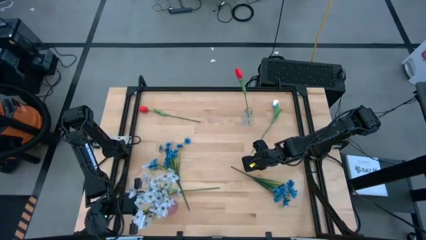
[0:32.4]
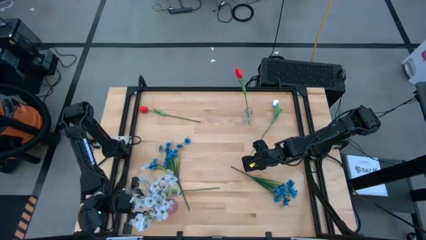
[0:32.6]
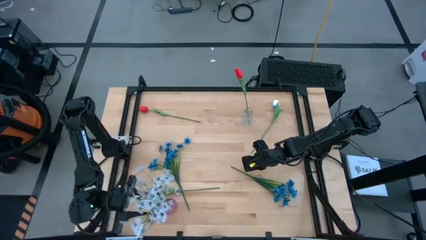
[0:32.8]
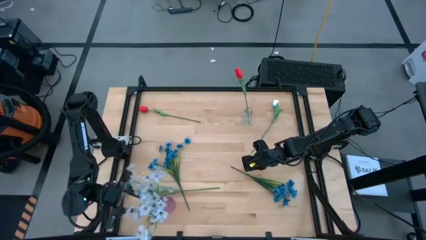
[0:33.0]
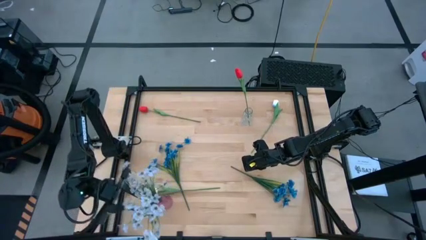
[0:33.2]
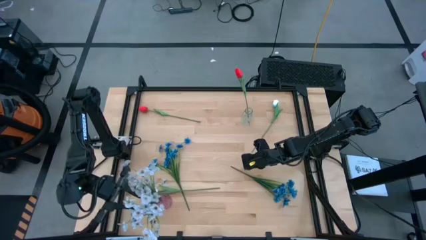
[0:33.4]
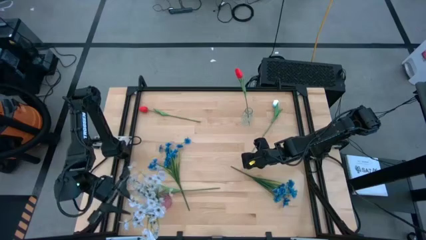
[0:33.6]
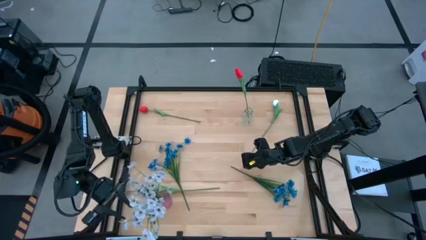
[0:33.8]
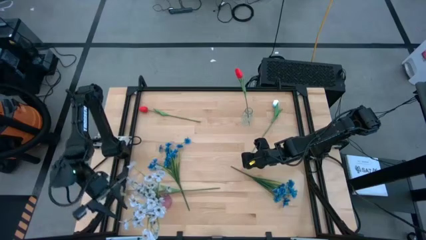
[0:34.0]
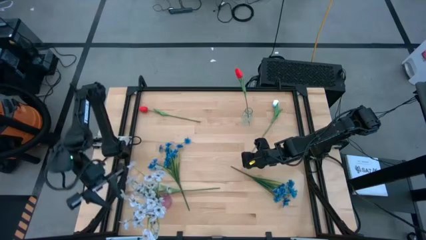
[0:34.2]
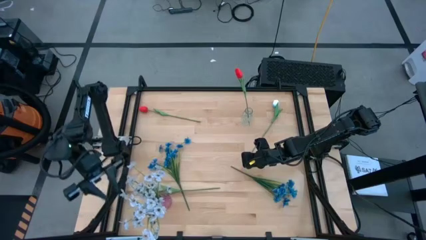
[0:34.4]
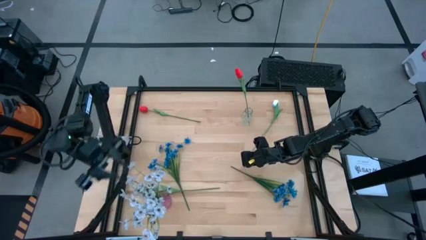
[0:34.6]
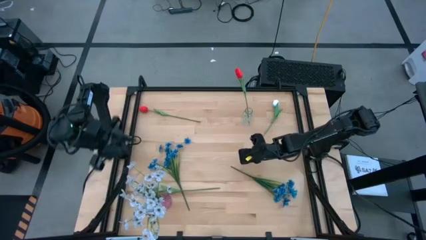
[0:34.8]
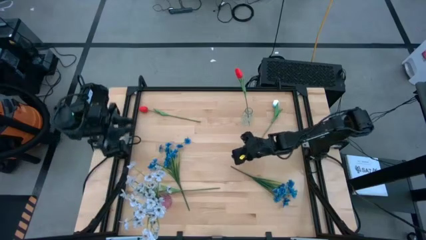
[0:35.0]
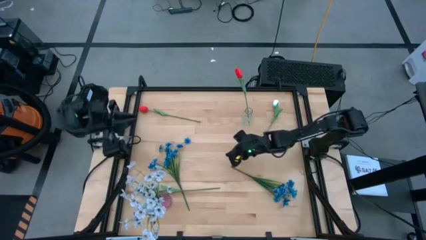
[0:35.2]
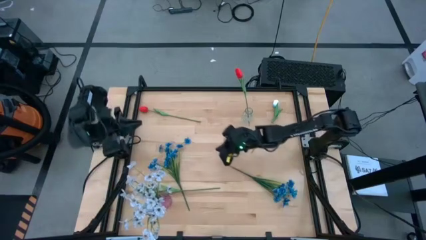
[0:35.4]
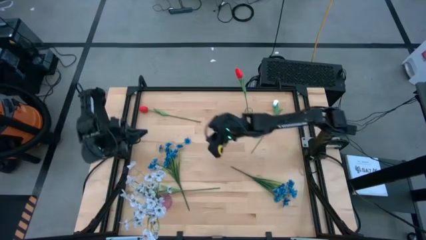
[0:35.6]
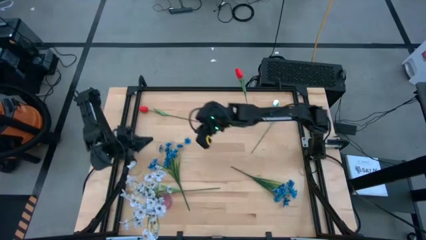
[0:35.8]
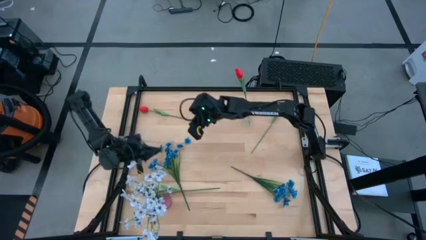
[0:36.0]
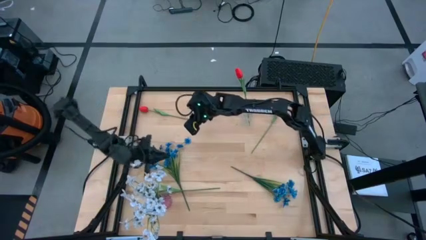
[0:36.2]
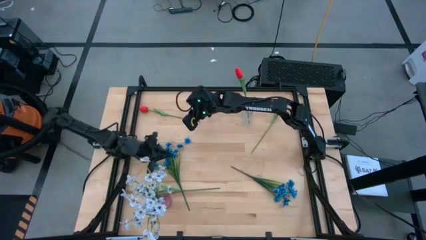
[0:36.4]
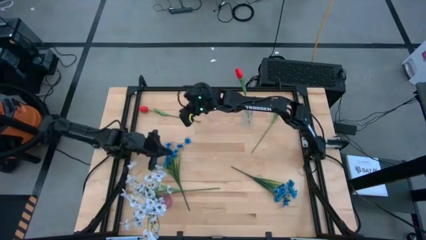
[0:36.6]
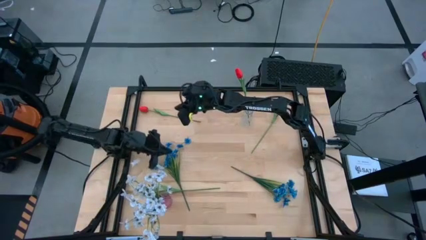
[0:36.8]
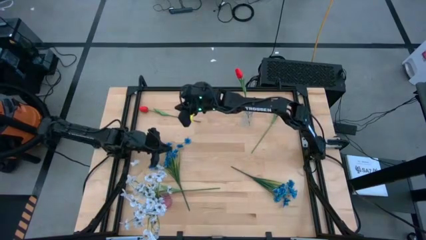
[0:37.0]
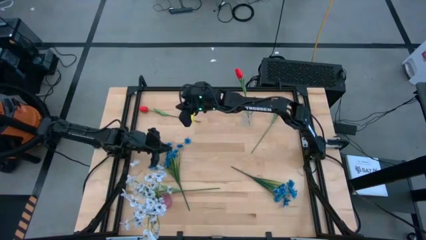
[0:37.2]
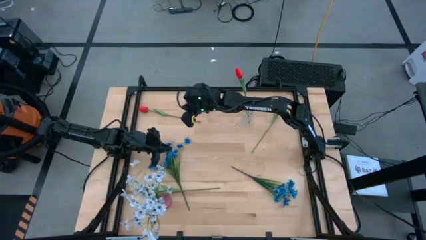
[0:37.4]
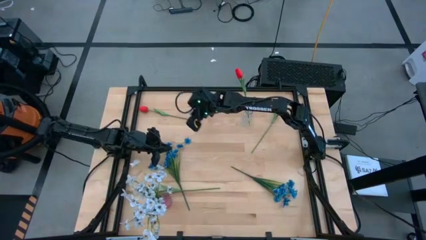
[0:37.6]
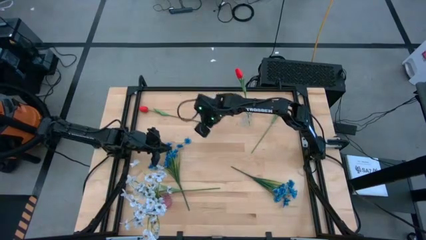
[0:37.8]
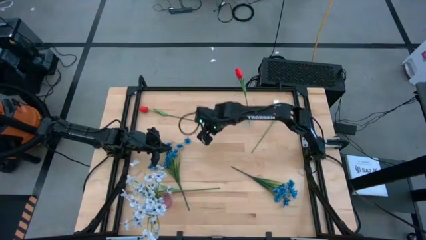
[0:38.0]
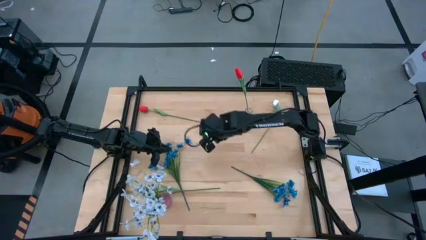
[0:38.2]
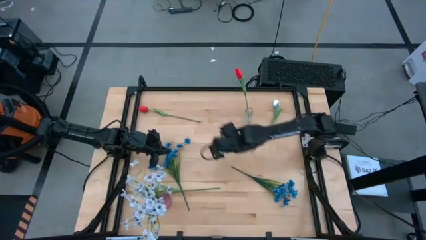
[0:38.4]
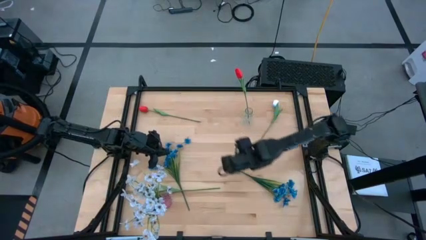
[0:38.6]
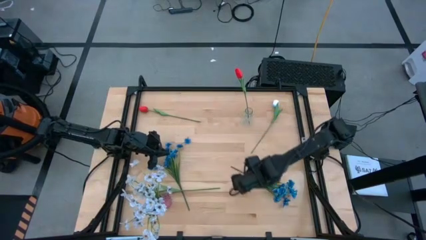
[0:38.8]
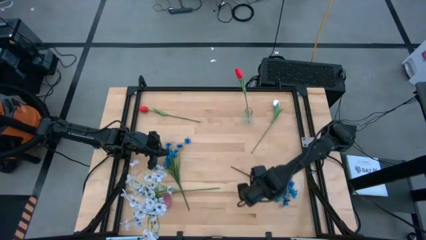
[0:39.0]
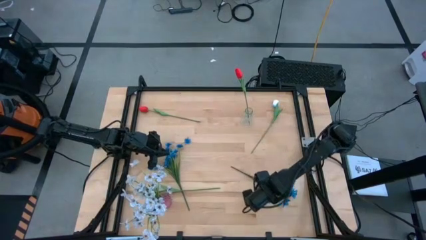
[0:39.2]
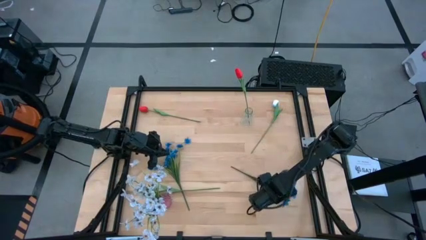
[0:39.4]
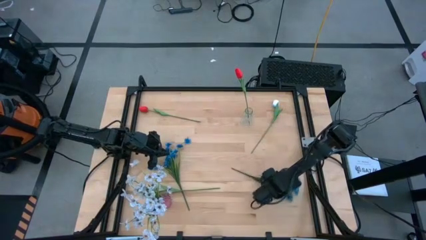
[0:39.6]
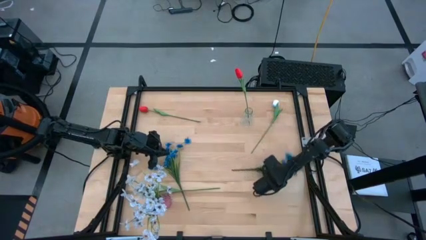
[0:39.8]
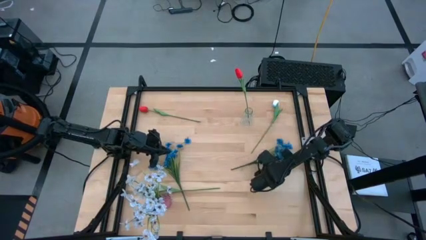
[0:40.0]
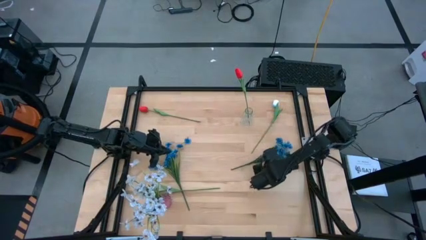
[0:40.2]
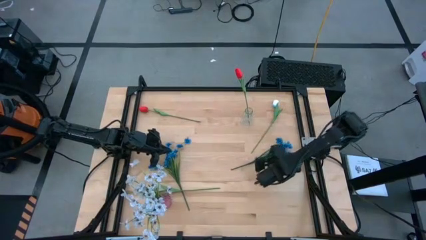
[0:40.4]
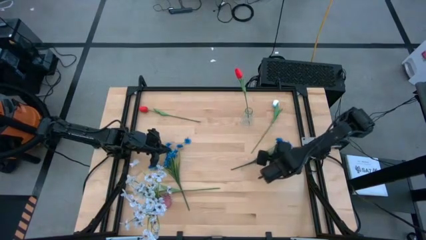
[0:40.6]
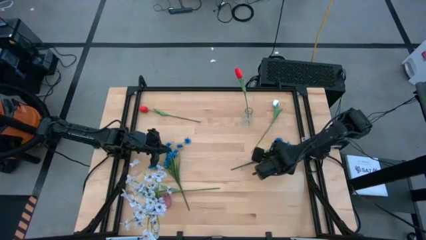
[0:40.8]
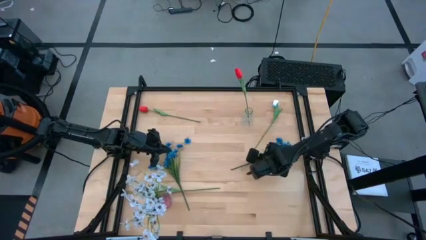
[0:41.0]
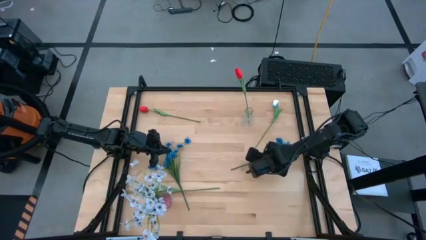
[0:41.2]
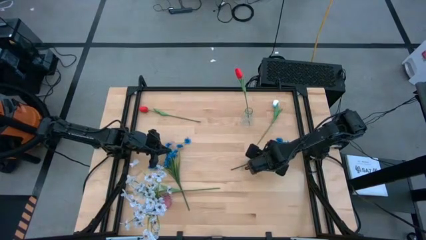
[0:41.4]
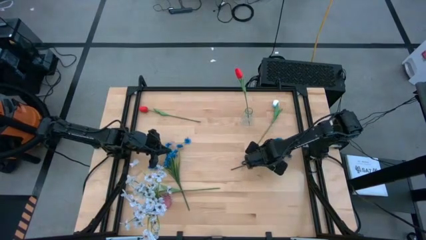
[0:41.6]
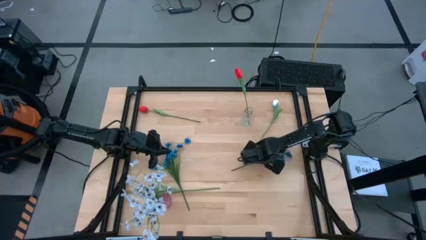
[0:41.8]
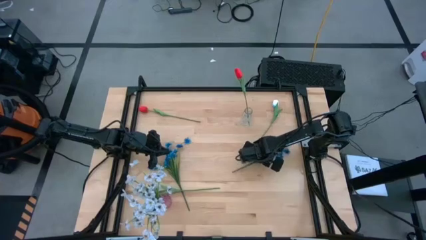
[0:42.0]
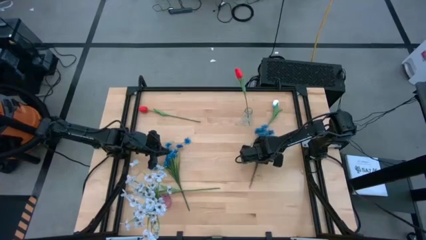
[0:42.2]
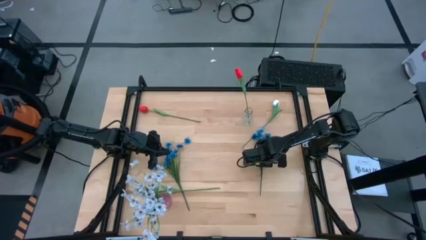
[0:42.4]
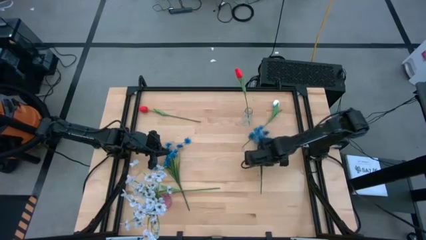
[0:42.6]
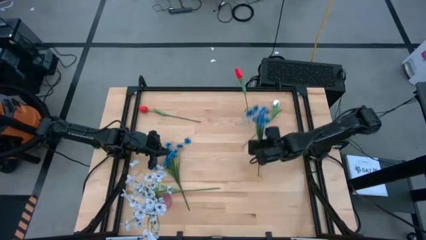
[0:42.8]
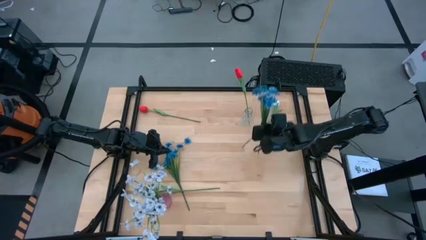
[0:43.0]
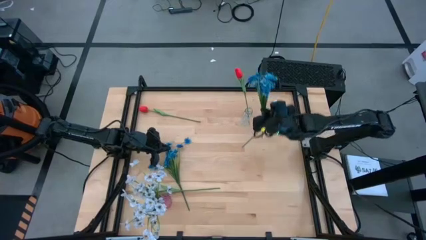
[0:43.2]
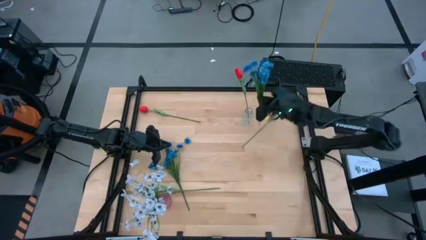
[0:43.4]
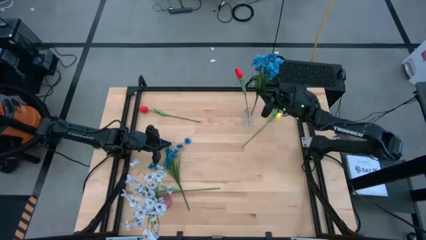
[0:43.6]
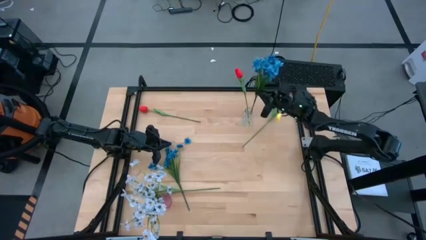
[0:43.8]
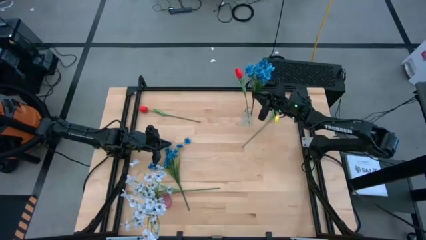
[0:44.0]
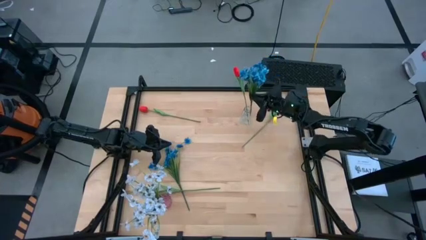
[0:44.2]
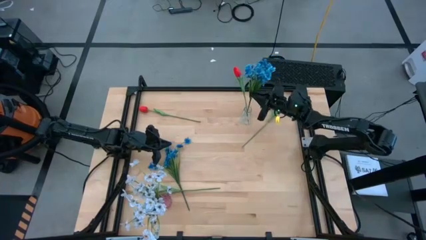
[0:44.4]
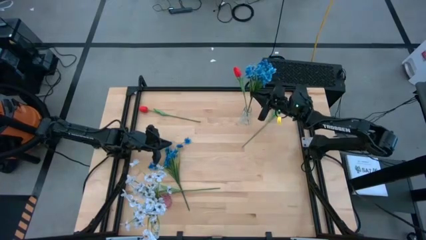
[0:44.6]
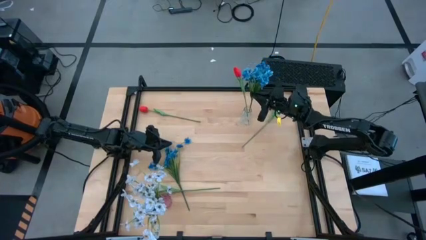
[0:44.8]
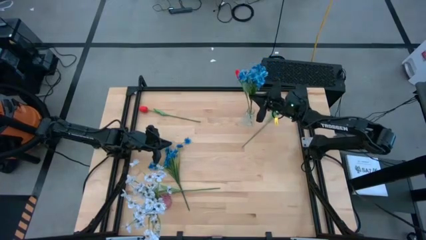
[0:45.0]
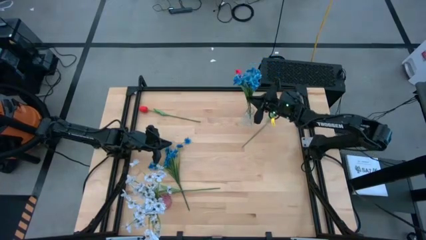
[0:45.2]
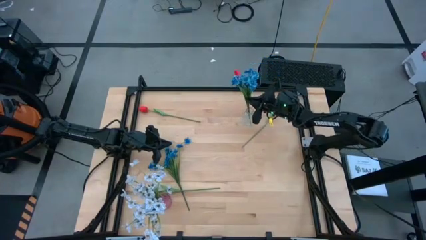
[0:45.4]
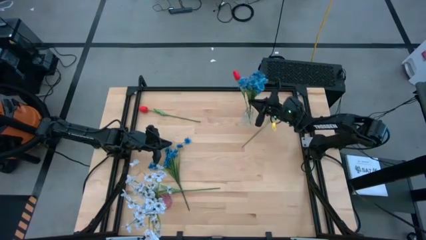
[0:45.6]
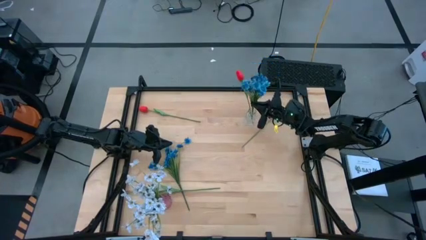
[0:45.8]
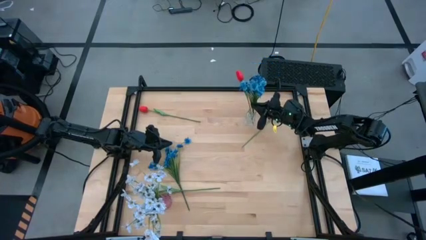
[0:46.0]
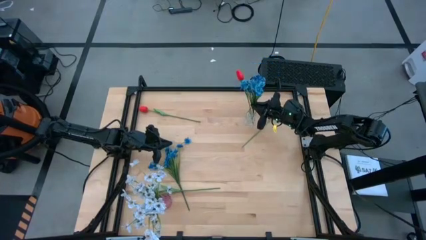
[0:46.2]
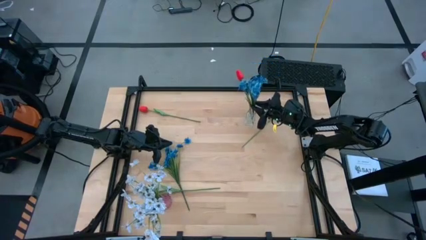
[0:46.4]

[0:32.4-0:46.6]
Task: Sort flowers into vase by color
Put the right blue flowers into the transparent vase

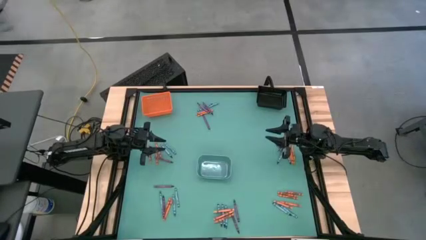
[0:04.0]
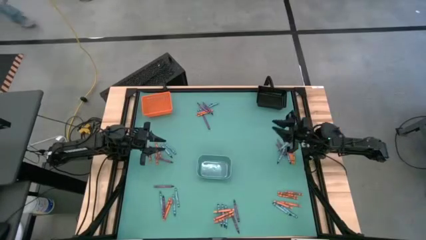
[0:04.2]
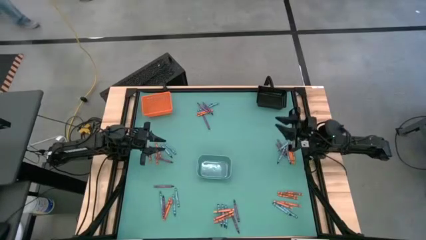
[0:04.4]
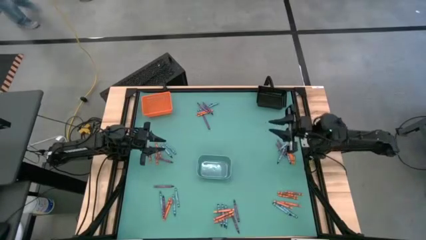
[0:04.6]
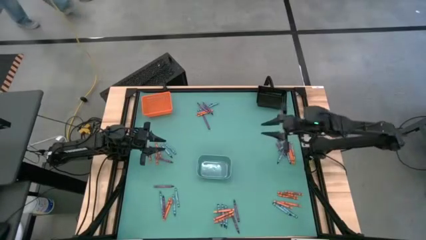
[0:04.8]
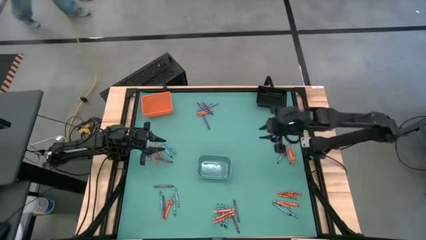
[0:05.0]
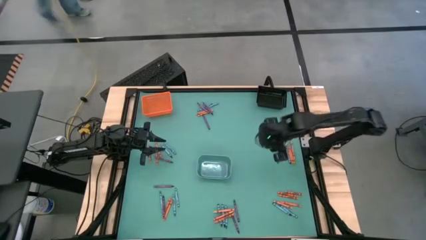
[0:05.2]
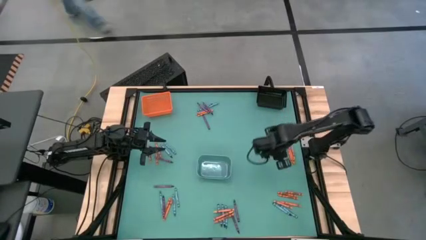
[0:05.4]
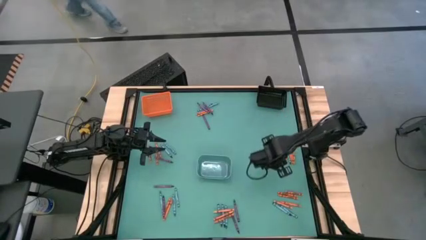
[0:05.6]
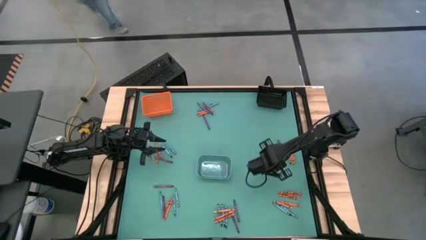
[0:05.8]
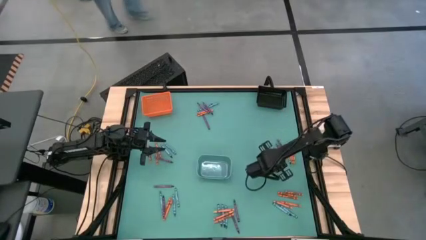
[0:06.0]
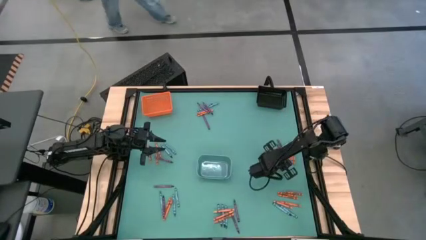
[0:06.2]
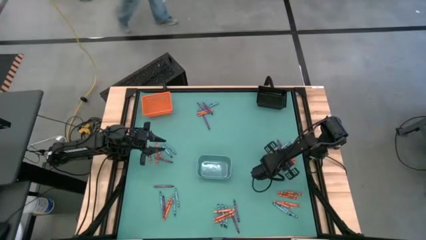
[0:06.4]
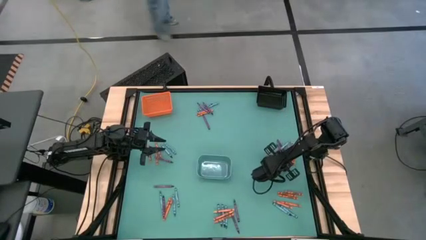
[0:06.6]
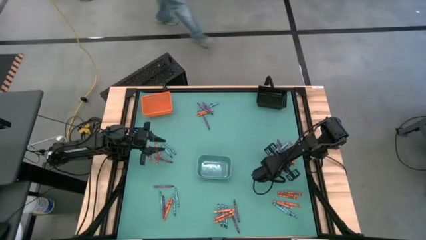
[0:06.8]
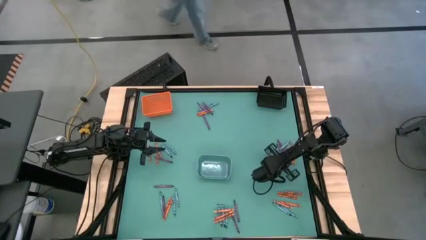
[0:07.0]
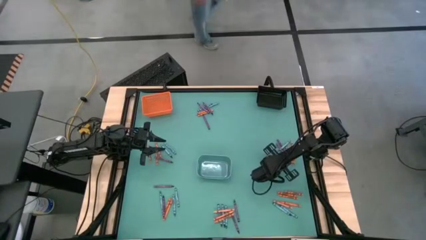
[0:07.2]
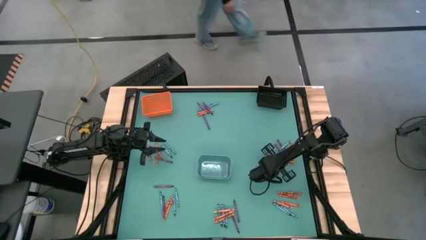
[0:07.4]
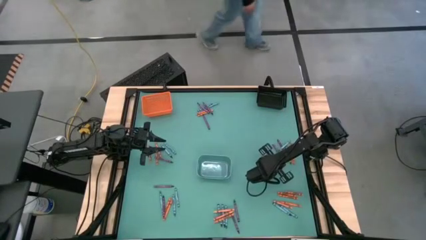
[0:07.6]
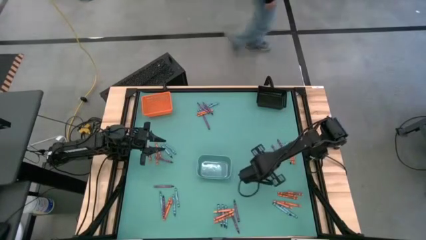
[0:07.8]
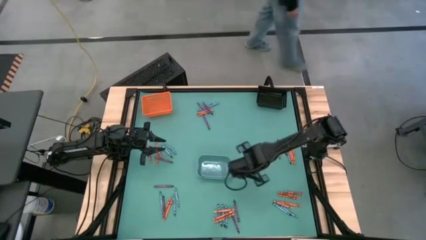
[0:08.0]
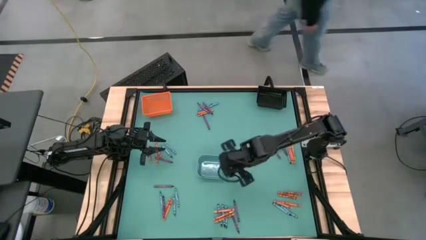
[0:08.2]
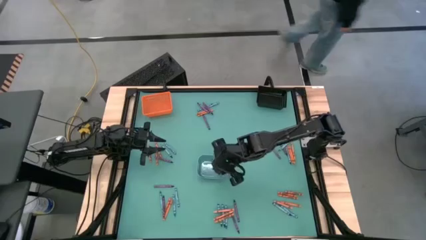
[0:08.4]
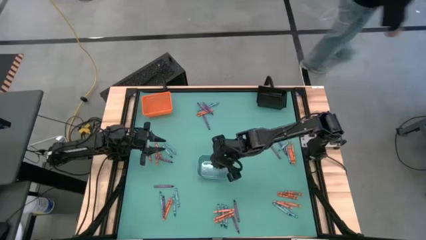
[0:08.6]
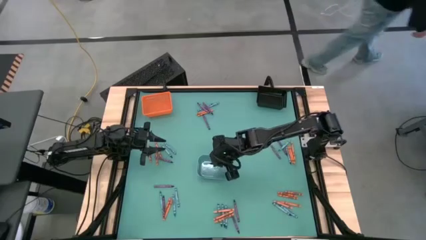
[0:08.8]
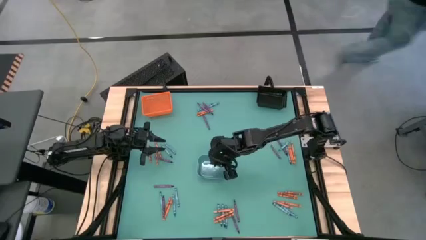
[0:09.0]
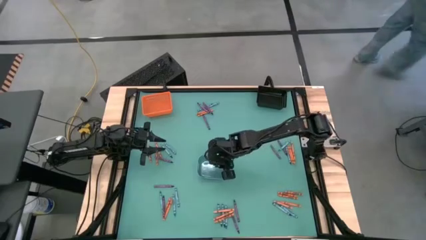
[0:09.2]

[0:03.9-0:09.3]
Task: Sort crayons
Put the blue crayon into the blue bin
